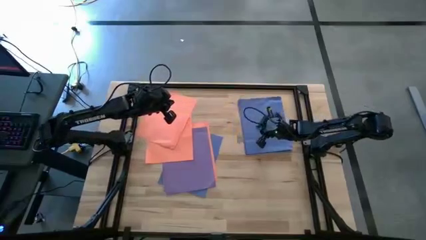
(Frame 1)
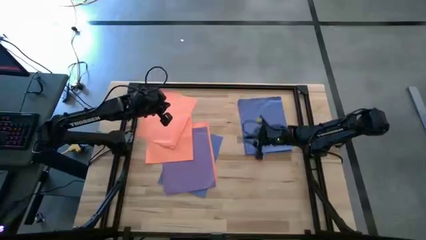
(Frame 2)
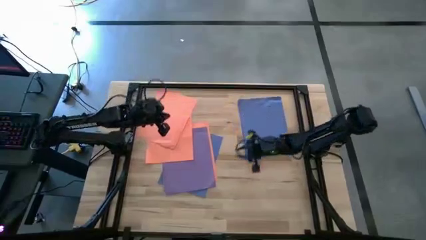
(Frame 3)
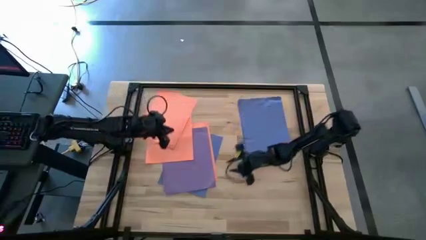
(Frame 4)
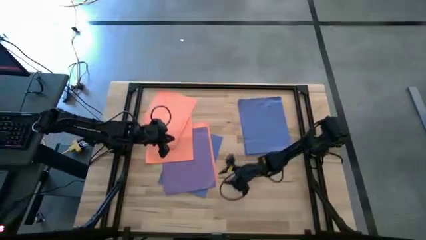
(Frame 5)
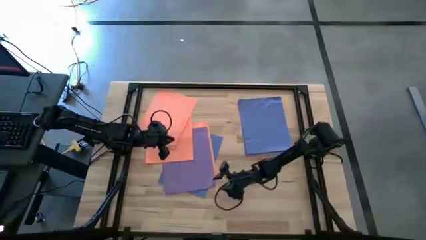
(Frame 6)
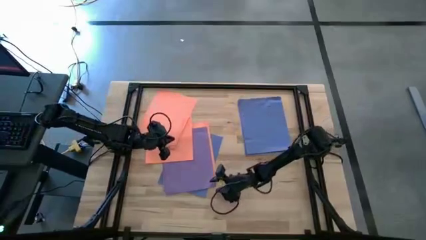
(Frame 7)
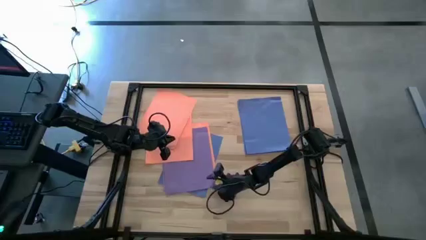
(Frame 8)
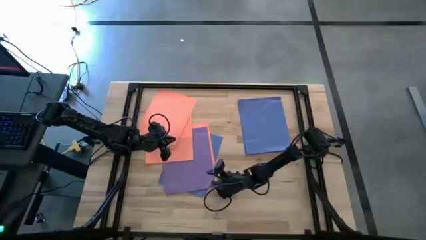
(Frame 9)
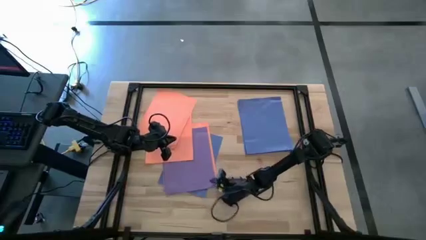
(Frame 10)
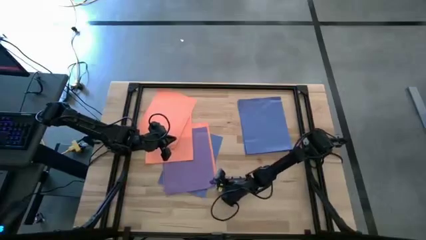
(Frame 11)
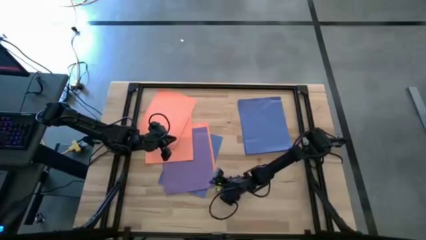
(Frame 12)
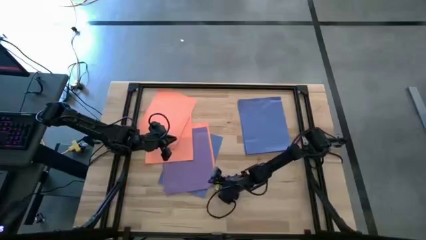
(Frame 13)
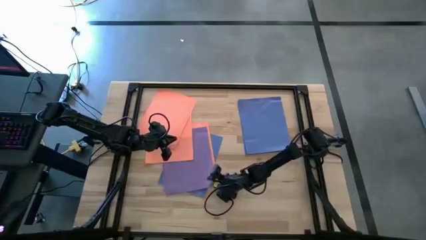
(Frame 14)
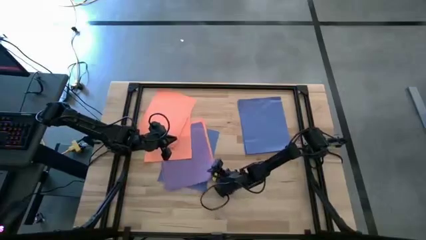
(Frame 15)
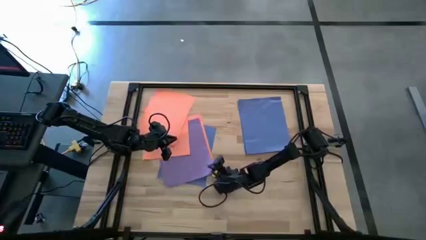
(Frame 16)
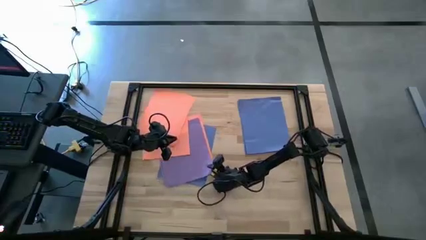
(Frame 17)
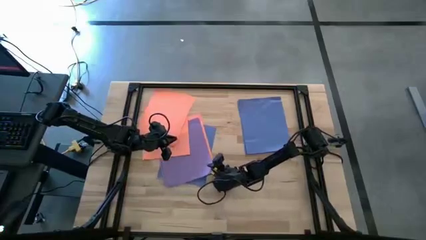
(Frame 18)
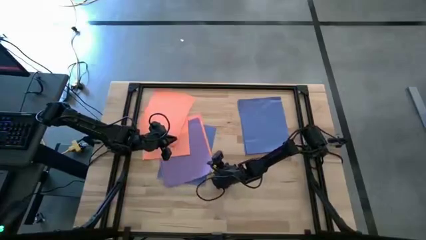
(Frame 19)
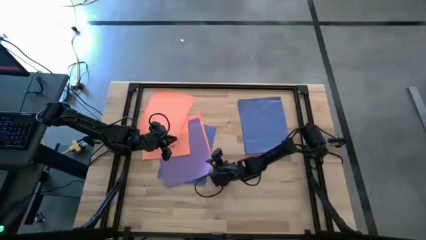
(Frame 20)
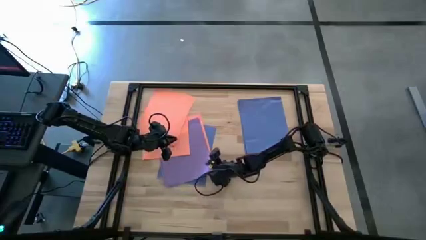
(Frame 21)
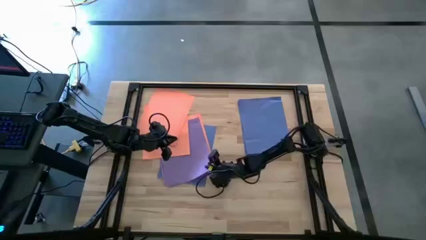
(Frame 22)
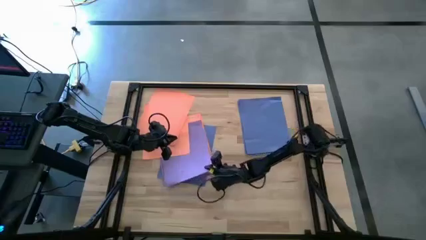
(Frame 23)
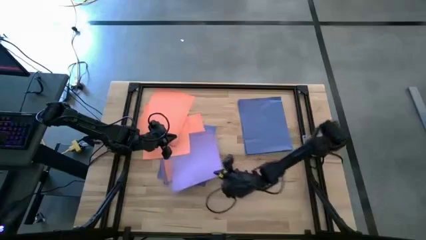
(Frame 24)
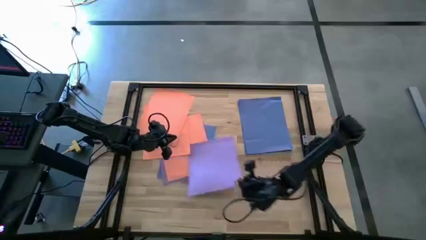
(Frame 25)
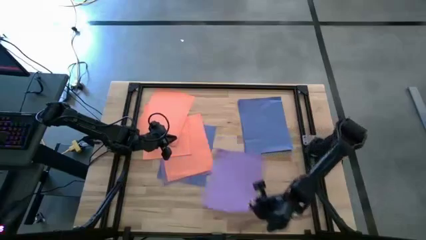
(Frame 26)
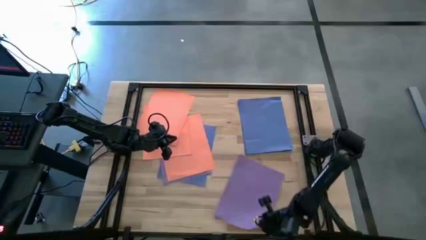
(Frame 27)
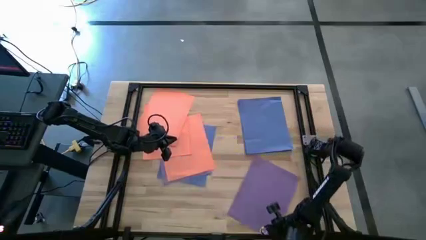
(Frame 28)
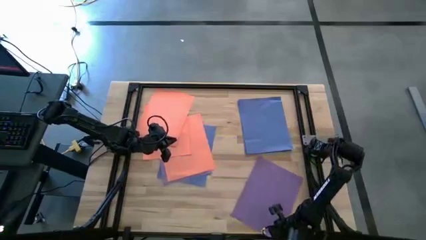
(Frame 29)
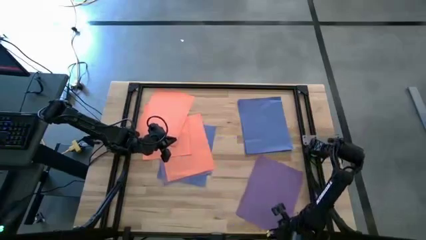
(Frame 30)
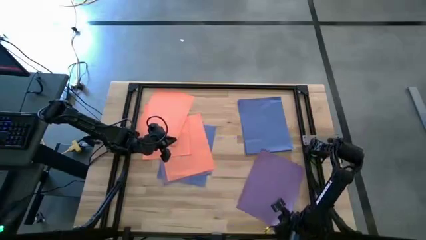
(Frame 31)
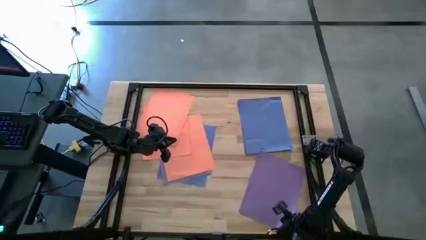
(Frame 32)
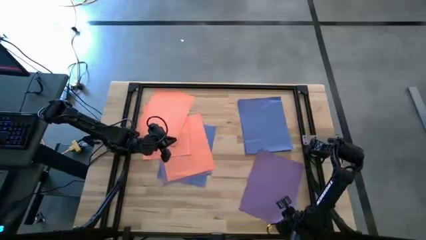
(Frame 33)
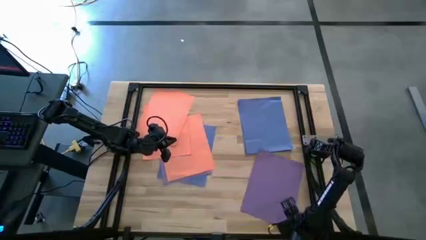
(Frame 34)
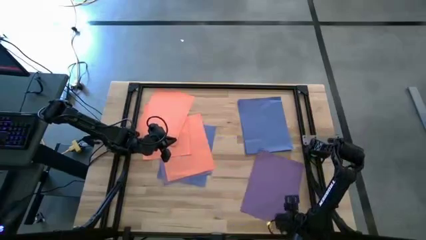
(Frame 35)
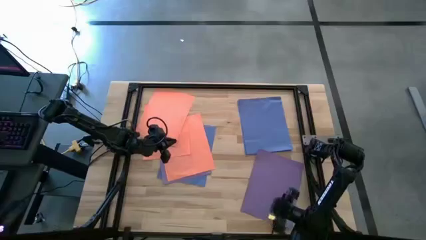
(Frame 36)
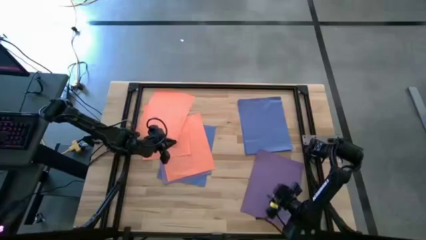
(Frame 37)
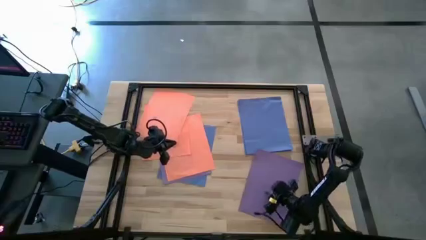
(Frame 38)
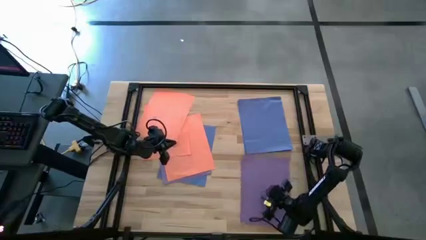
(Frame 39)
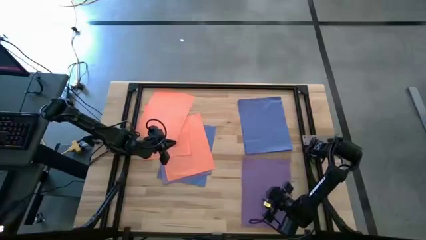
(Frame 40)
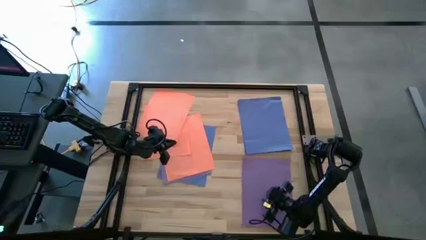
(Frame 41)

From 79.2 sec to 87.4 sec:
Task: Organize paper
Put the purple paper to the bottom right of the table

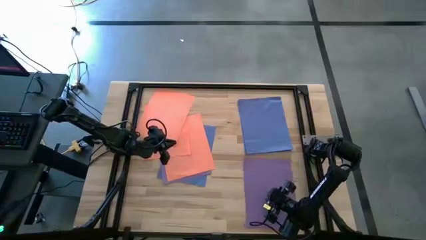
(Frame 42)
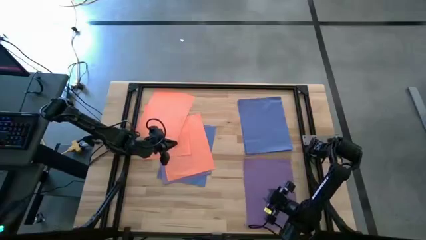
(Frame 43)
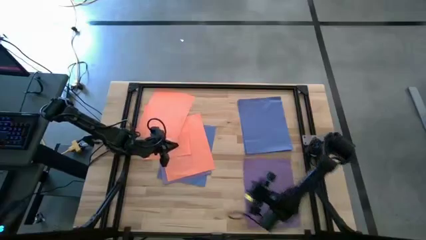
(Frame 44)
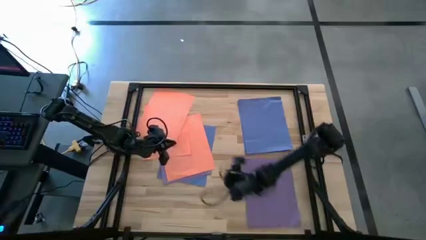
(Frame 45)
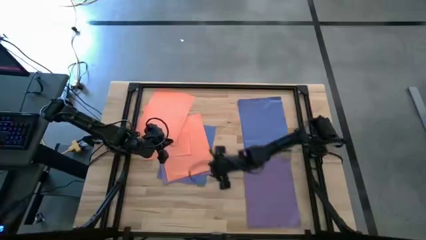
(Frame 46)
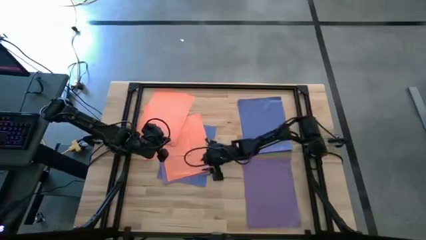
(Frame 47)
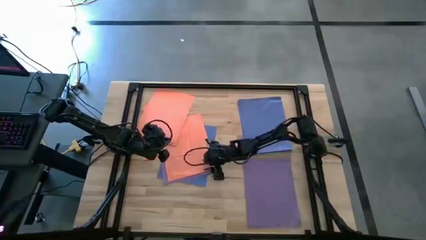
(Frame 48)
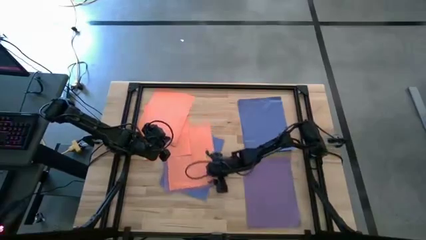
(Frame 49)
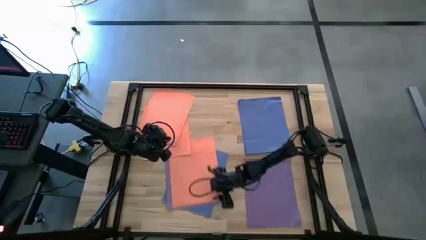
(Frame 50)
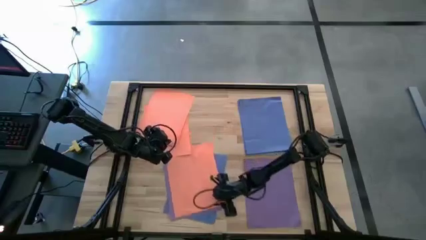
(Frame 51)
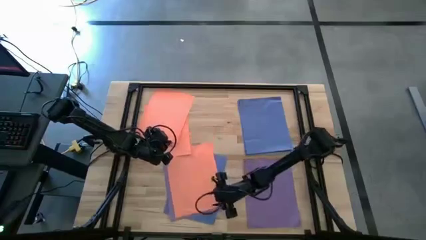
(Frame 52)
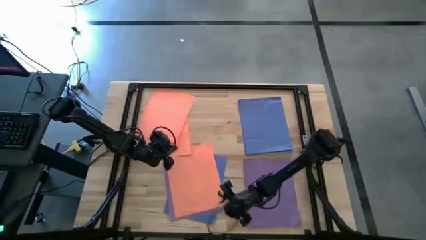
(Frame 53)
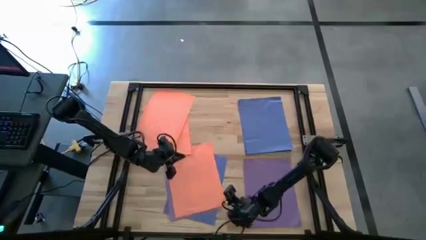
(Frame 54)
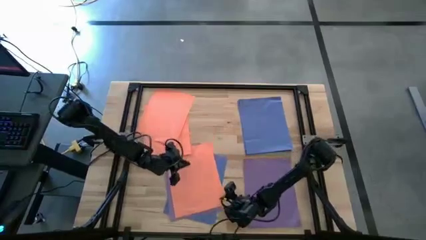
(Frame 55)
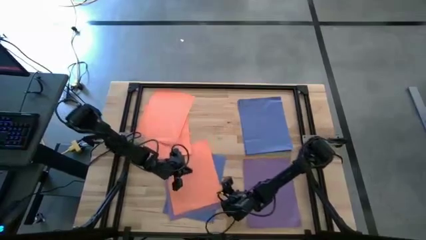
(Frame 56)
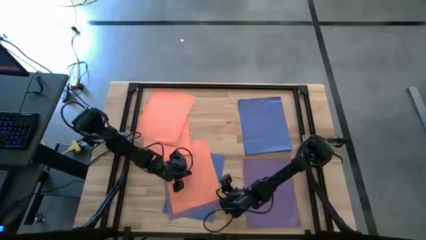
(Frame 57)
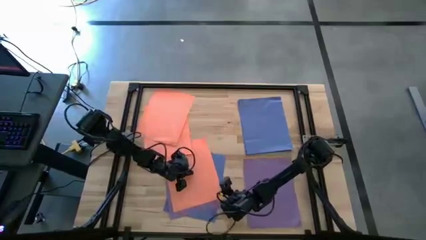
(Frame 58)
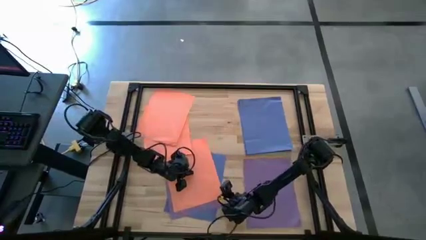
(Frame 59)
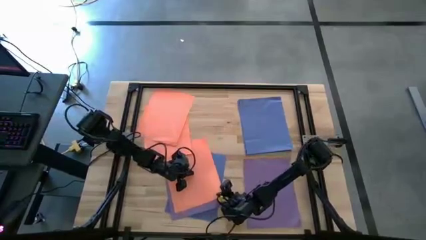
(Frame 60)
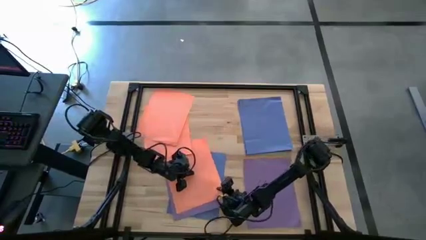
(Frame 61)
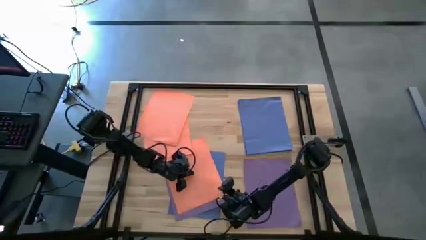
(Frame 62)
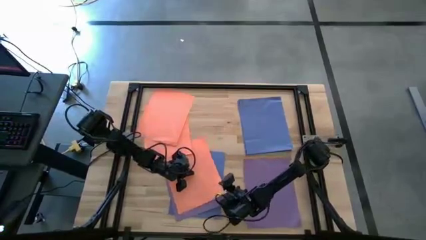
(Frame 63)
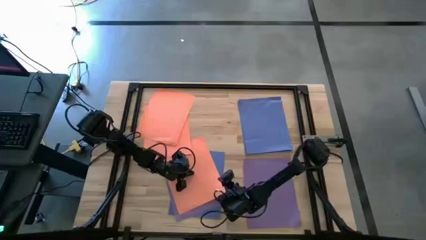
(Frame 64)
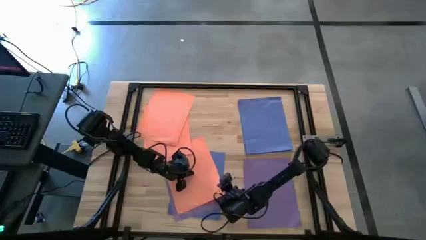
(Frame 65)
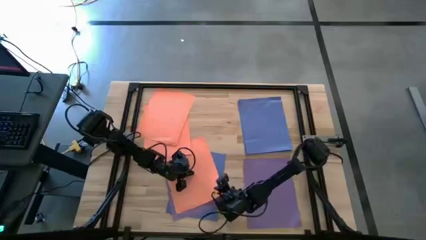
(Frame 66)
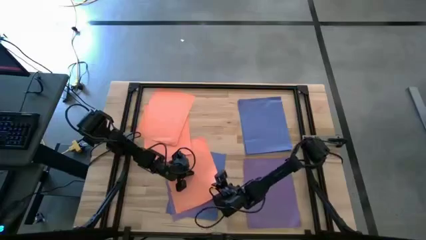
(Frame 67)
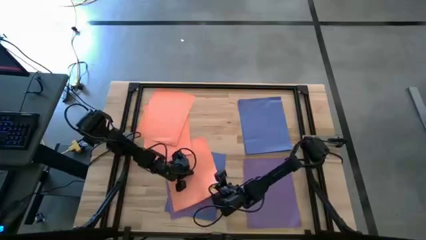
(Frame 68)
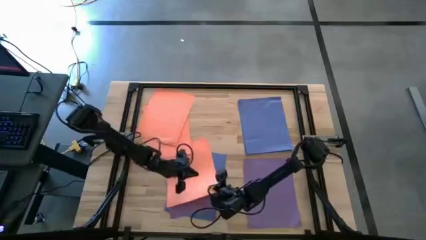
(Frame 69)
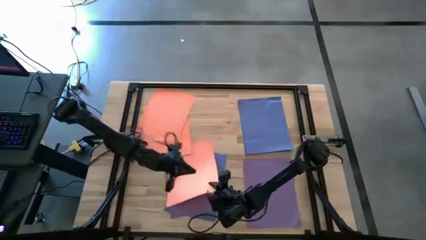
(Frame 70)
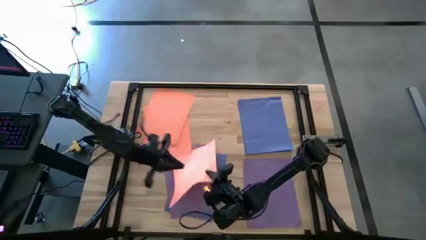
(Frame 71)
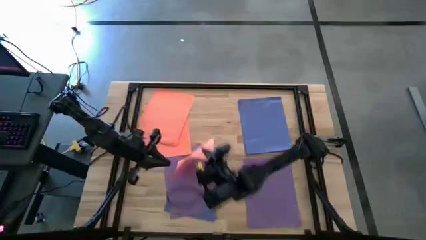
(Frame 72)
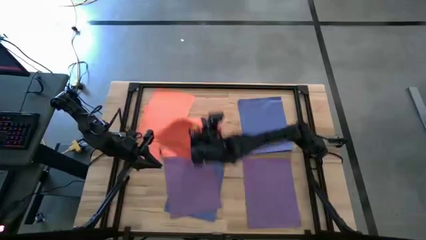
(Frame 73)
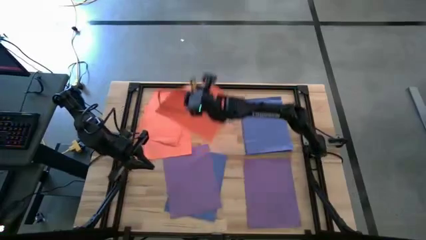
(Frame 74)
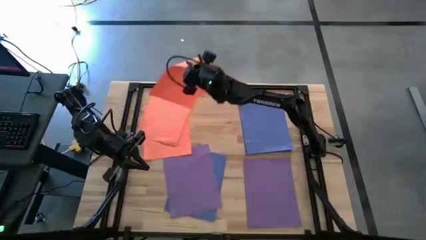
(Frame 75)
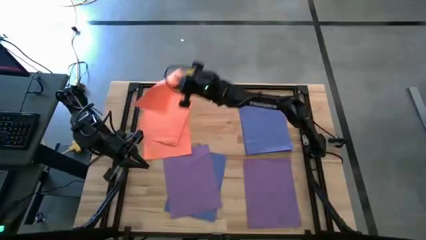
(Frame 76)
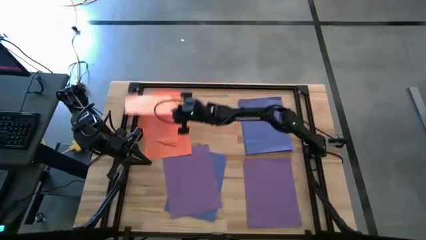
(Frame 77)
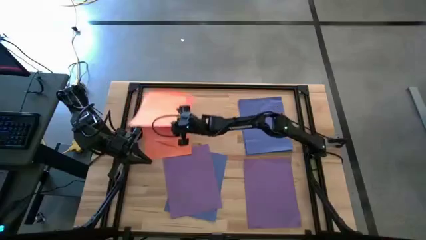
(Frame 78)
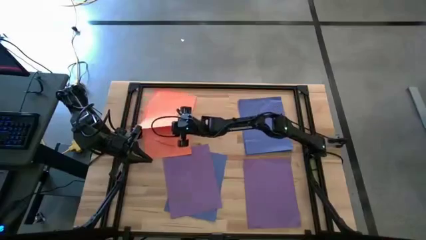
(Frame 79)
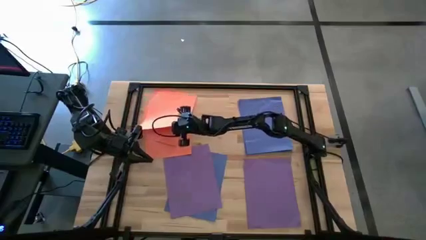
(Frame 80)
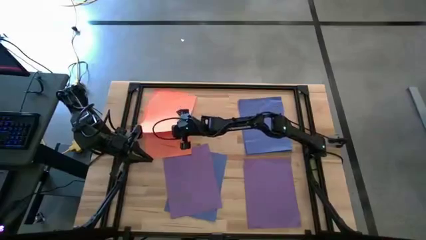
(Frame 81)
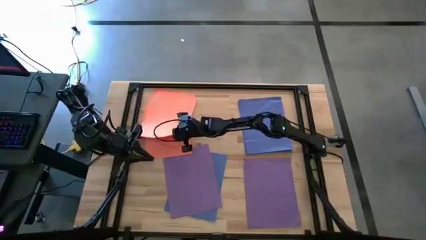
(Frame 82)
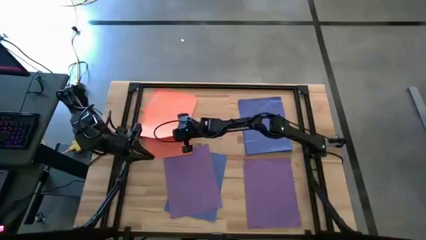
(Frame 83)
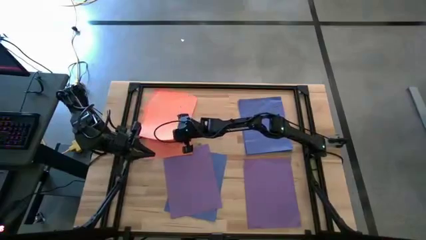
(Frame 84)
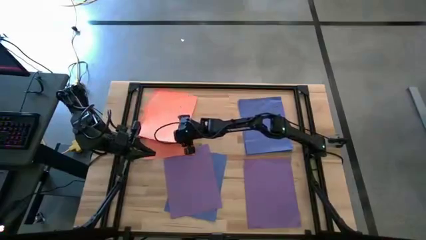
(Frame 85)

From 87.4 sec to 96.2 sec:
Stack the orange paper on top of the orange paper
